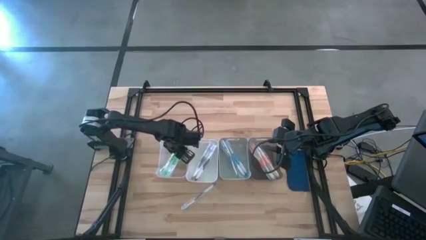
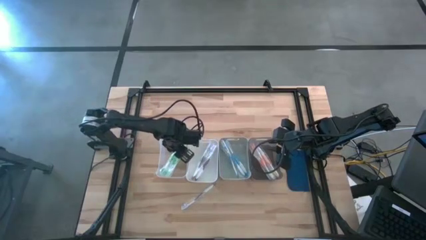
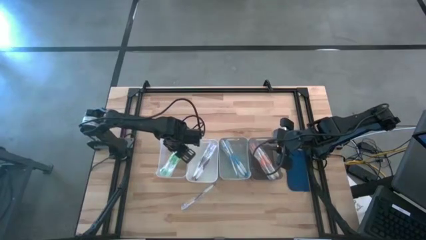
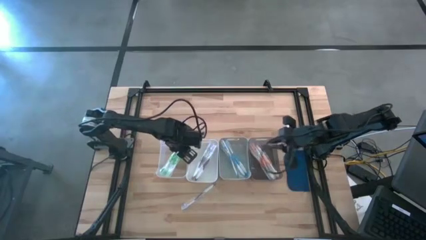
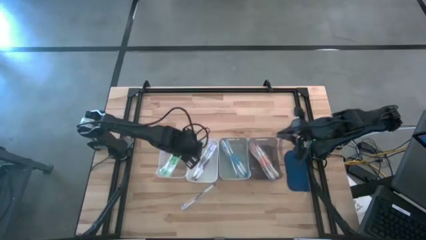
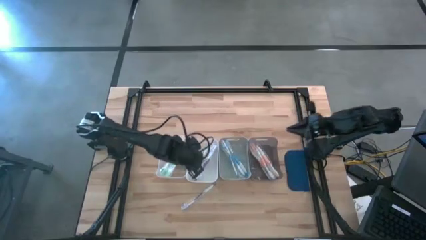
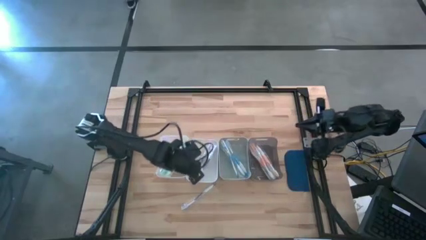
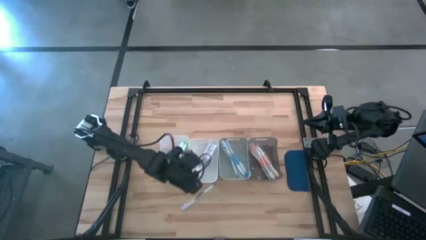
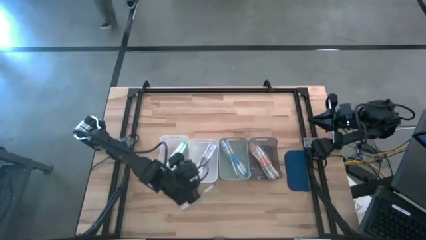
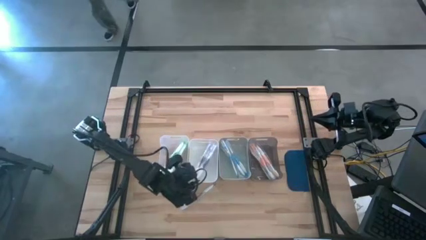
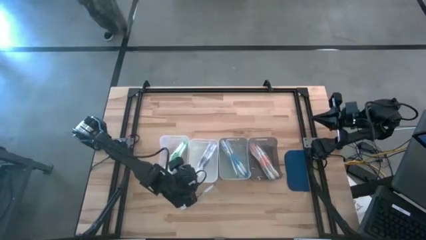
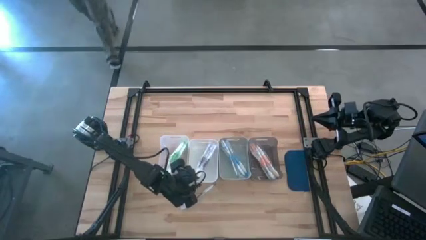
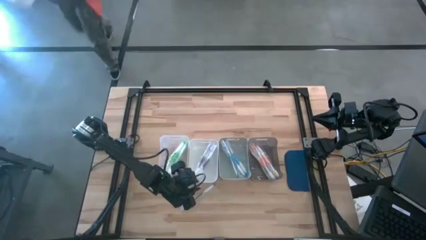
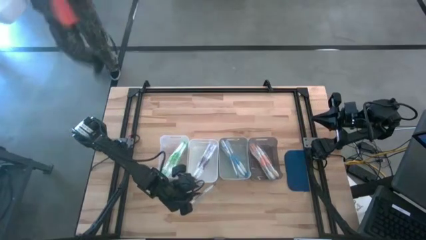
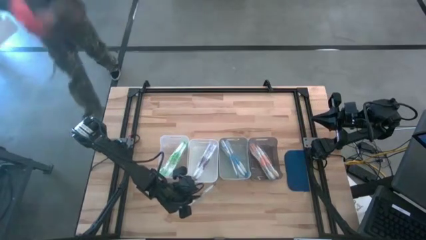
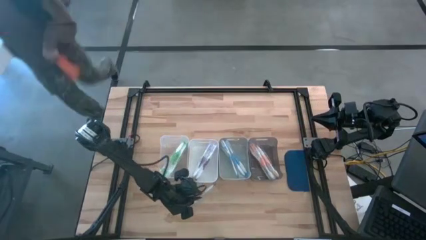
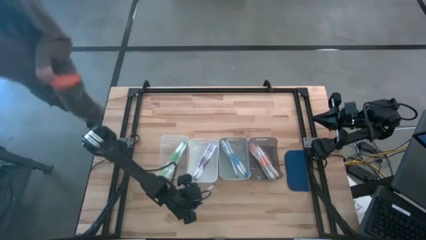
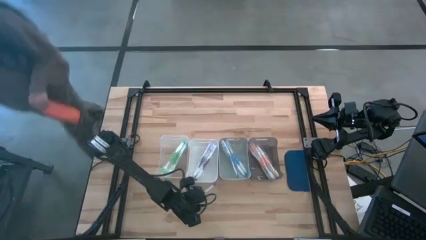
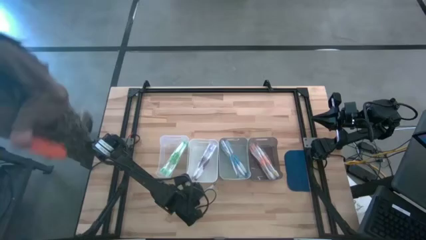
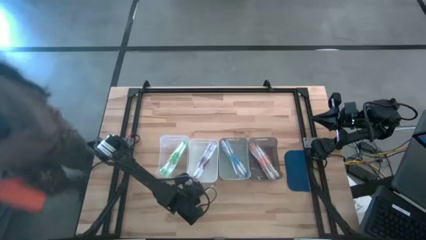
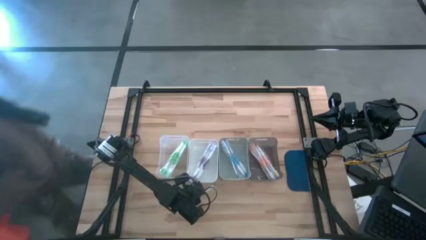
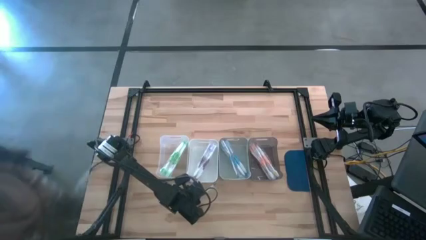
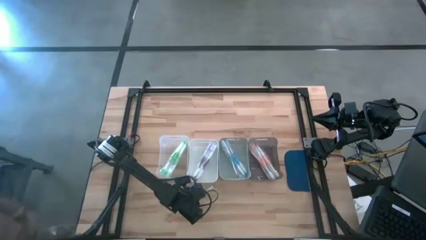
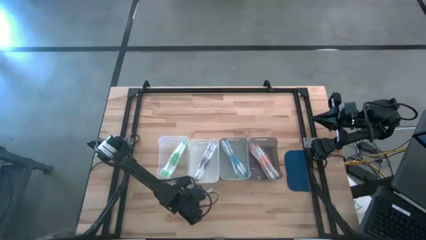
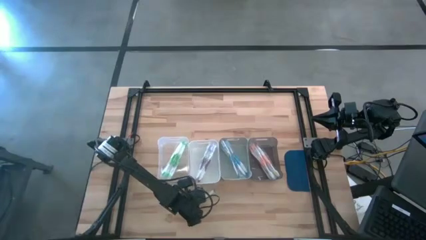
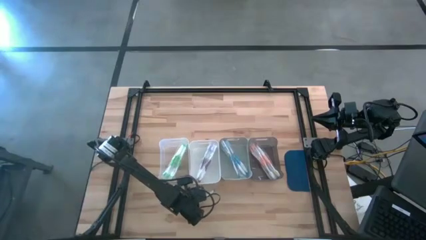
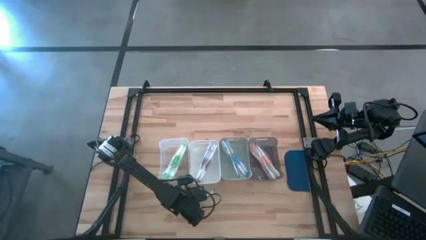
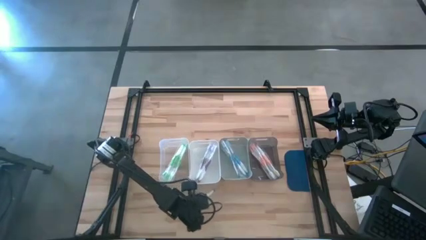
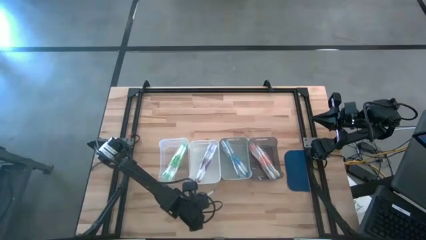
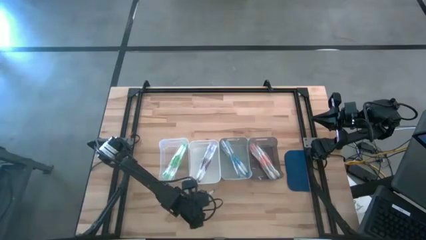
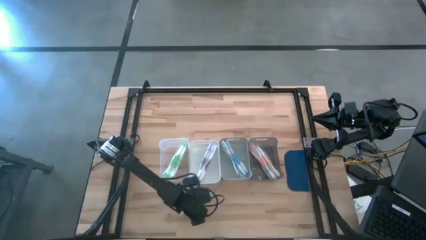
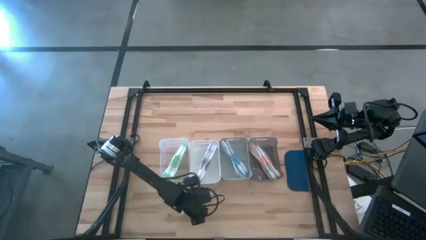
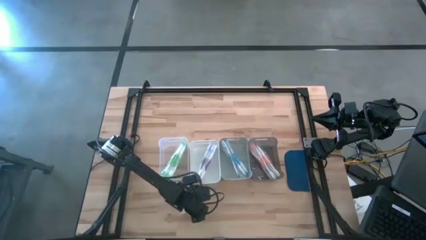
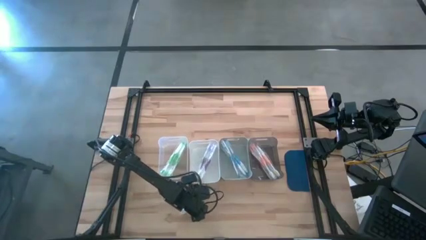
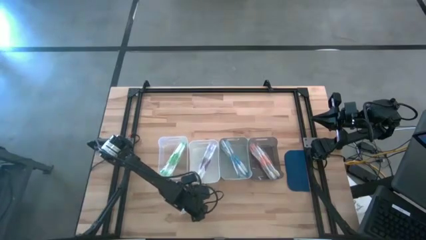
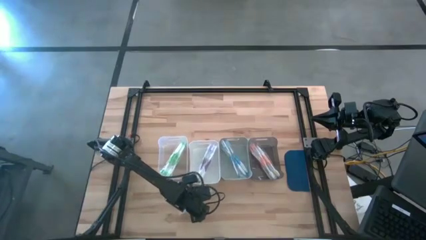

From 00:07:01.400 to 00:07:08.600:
Task: Pick & Place Toothbrushes
Put the purple toothbrush into the white bin

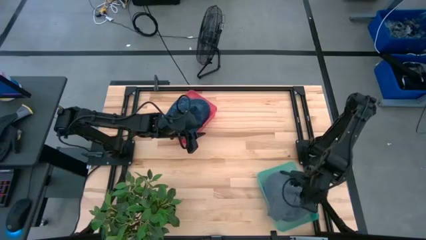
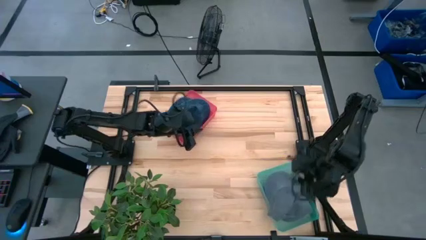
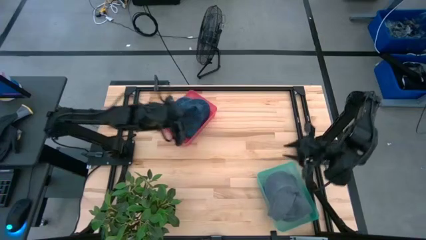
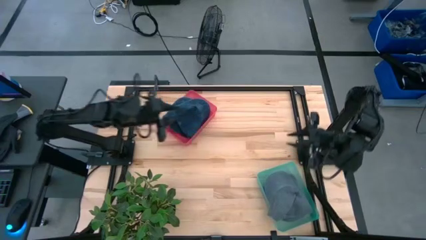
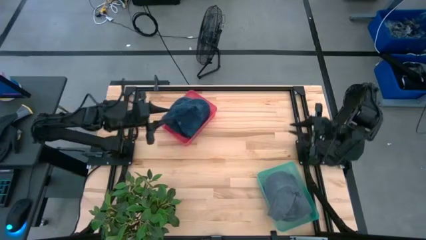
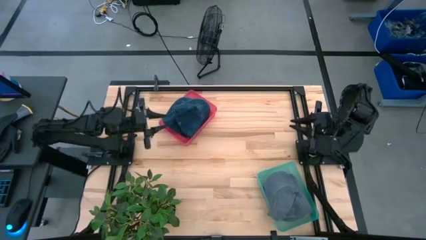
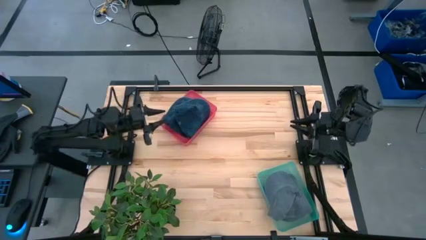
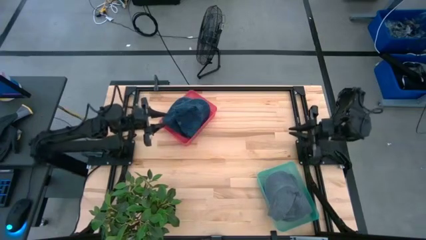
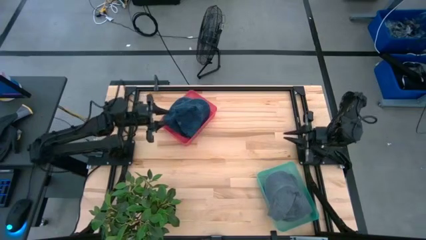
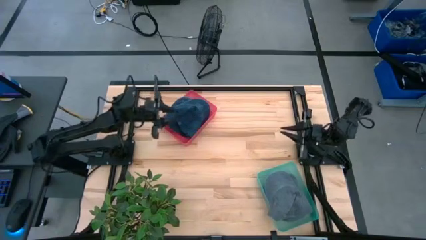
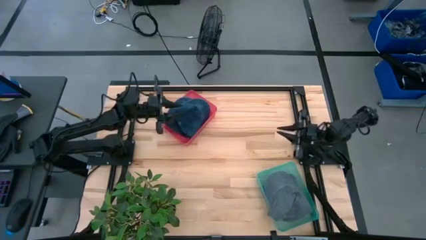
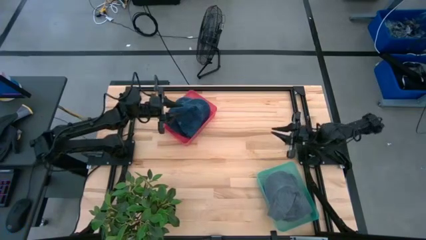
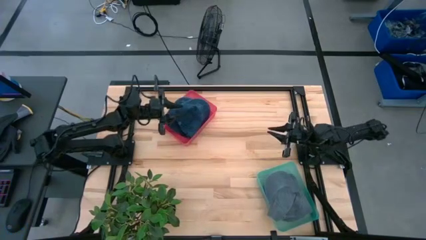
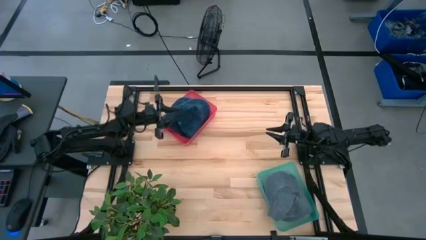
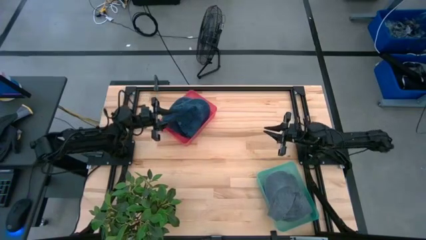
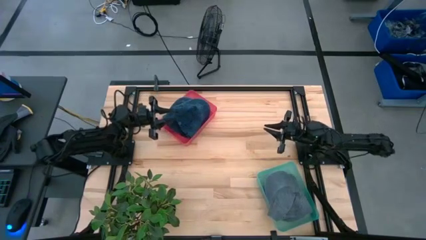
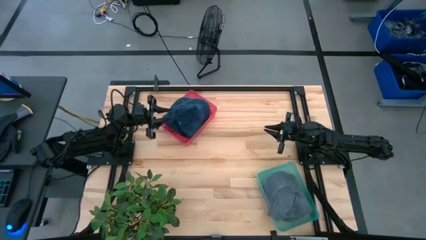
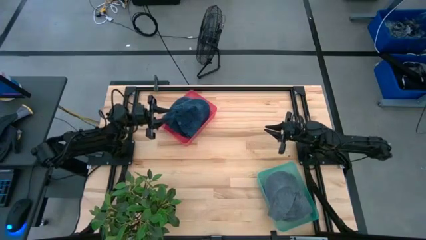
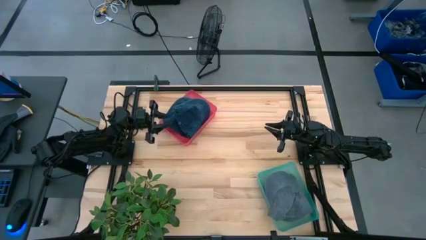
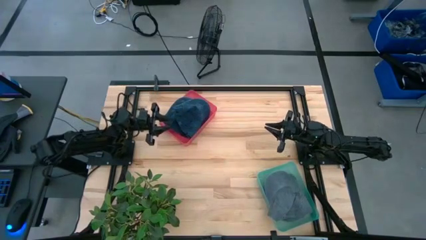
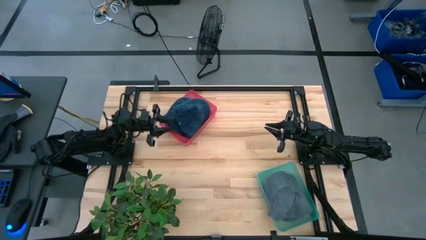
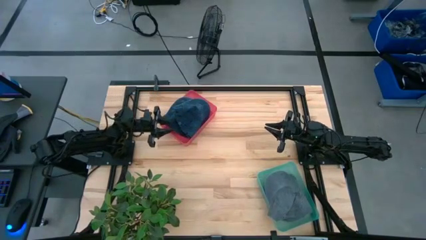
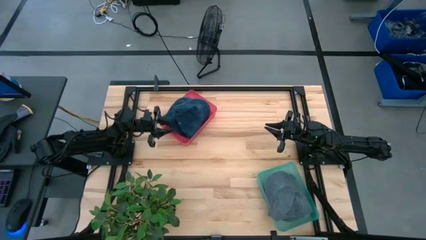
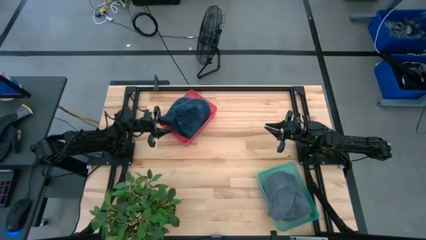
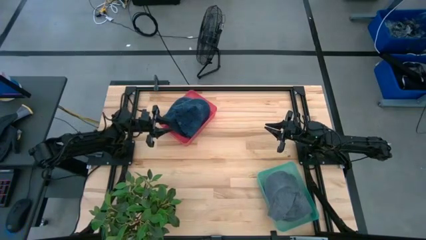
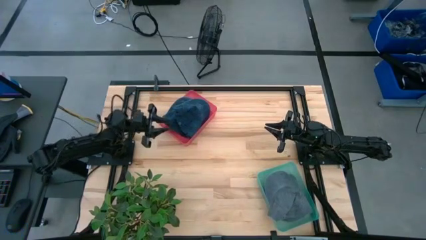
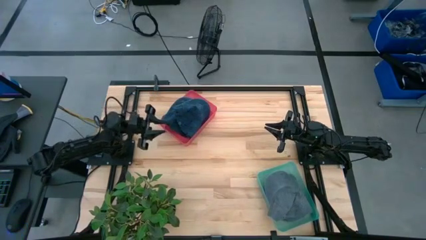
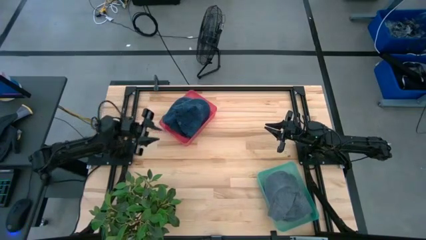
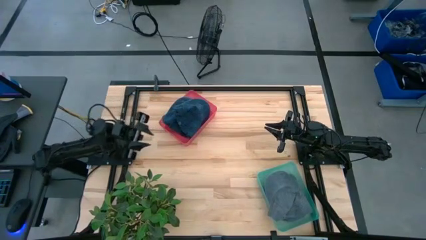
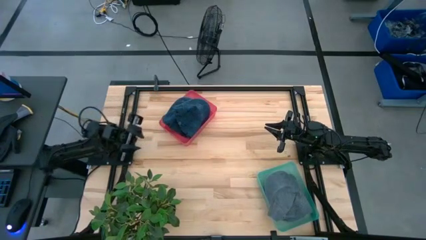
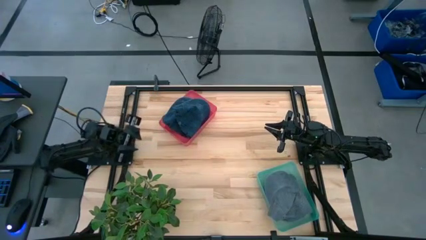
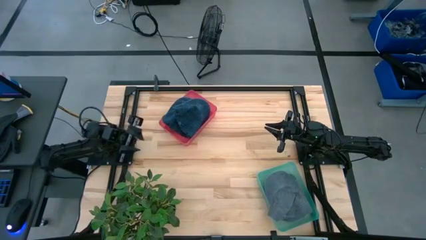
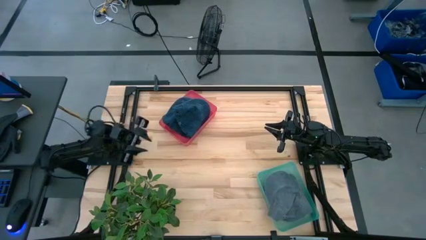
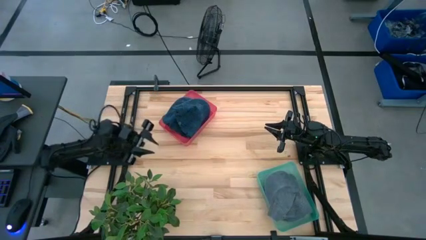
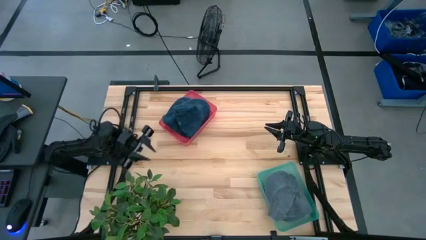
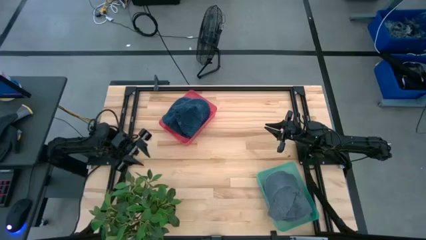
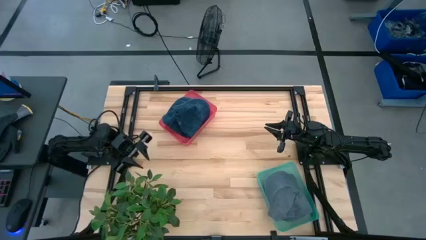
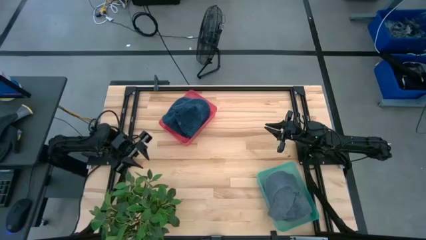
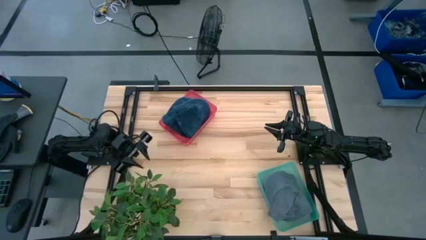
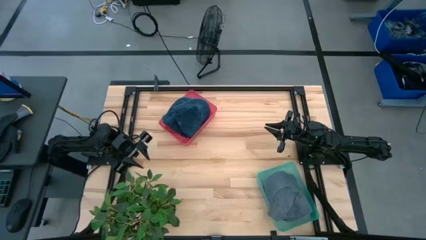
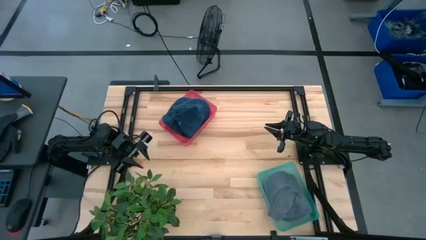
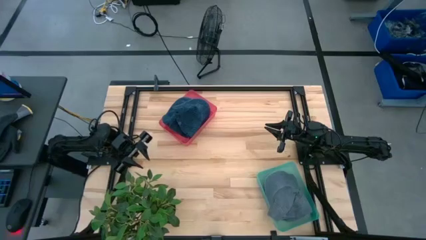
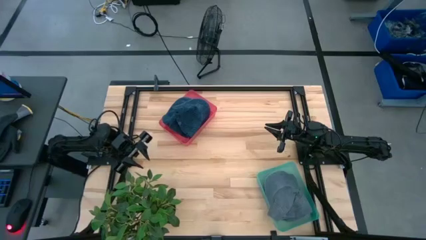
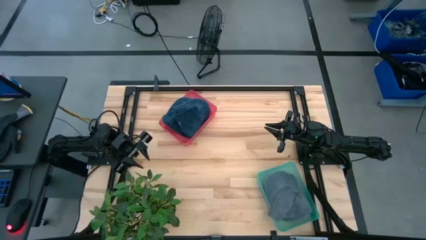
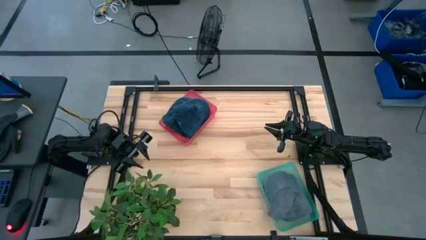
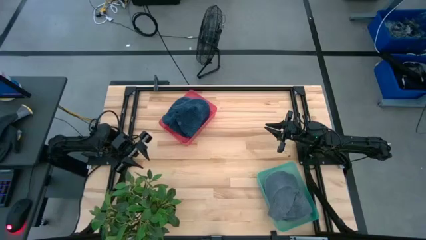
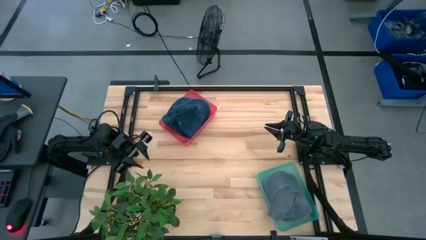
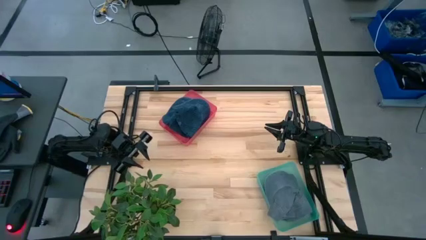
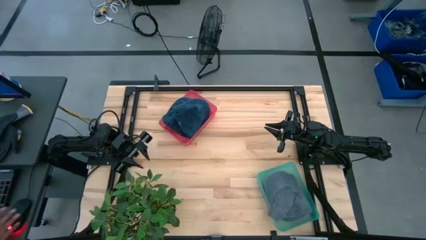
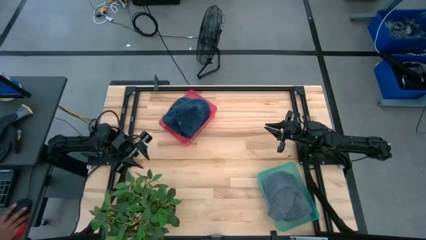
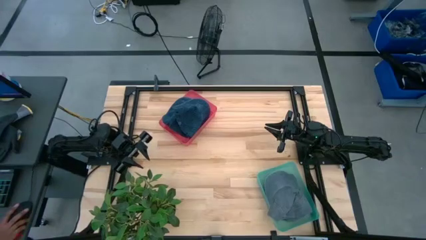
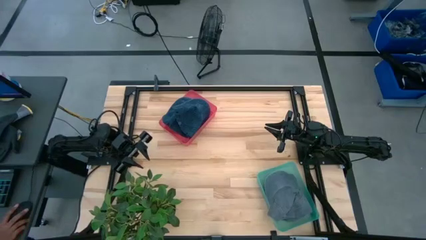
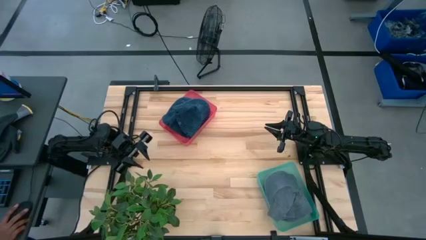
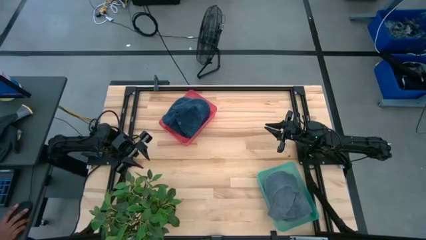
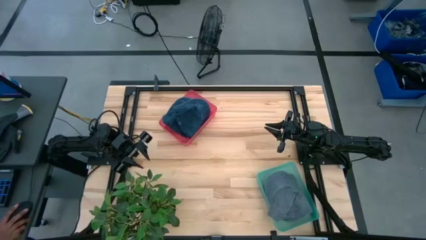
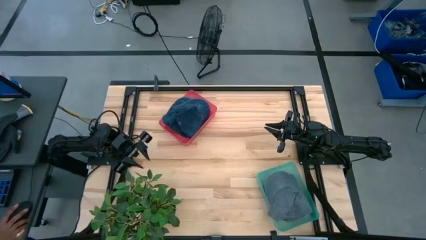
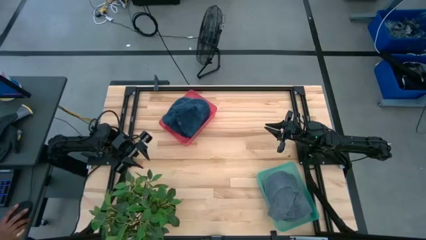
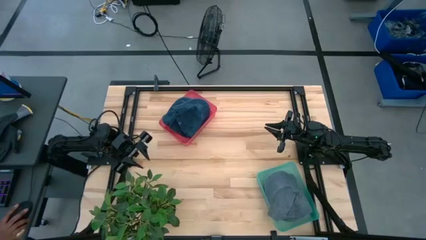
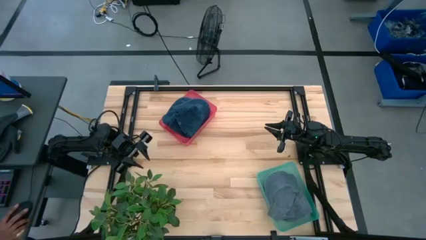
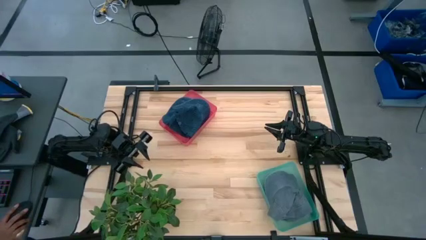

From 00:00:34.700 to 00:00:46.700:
Task: Pick & Place hat
Return to Home Position
